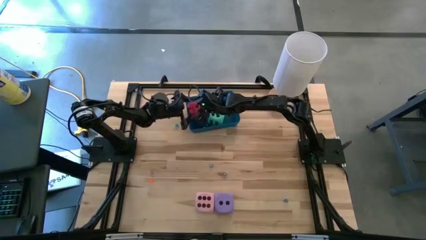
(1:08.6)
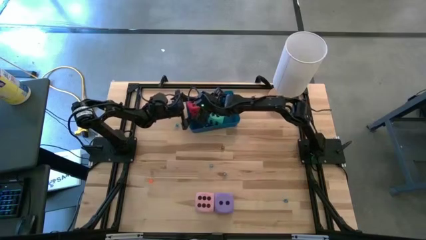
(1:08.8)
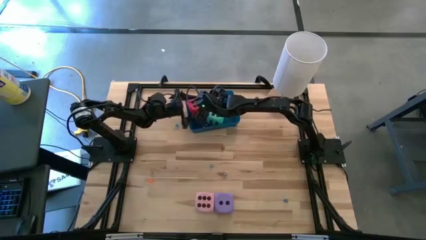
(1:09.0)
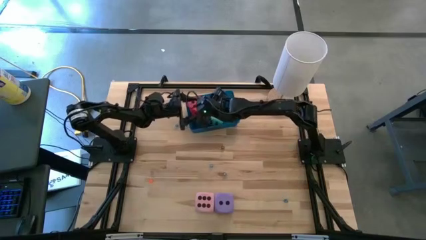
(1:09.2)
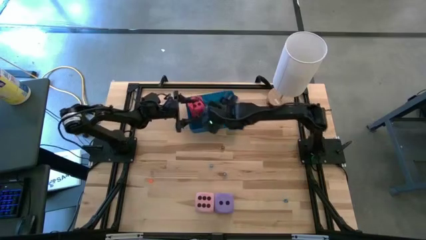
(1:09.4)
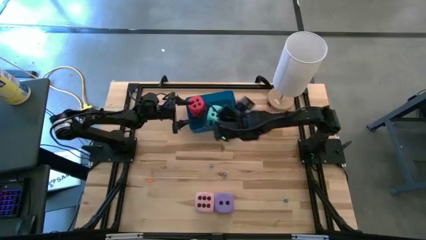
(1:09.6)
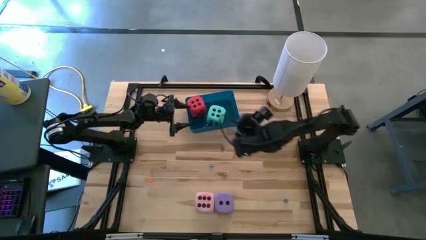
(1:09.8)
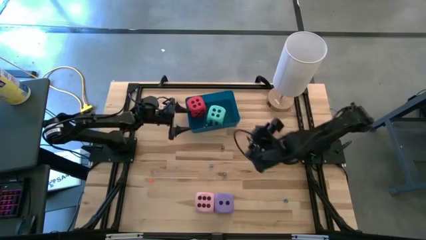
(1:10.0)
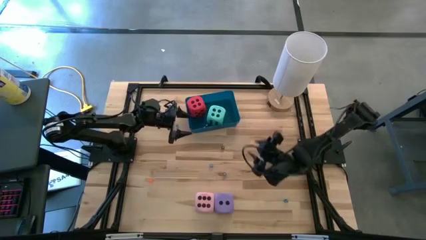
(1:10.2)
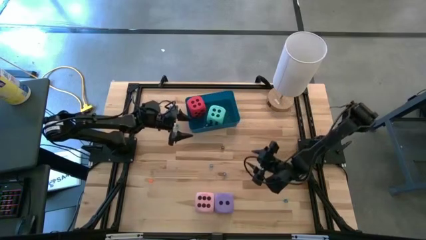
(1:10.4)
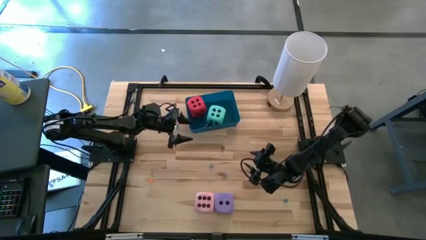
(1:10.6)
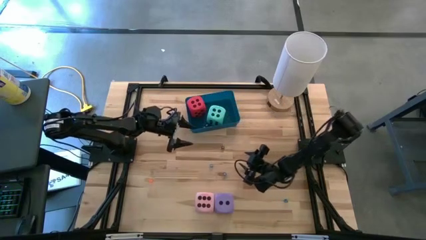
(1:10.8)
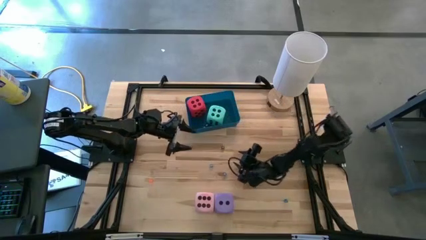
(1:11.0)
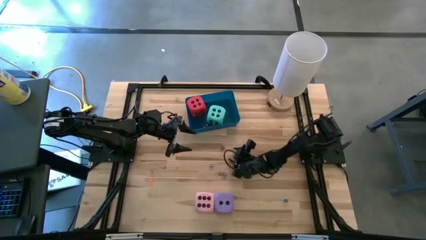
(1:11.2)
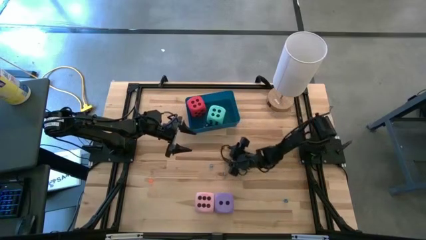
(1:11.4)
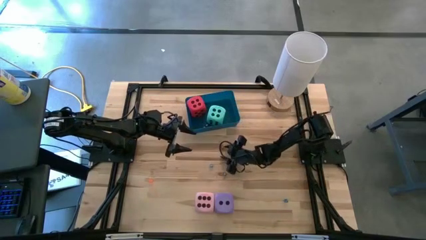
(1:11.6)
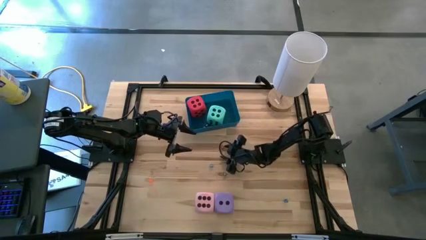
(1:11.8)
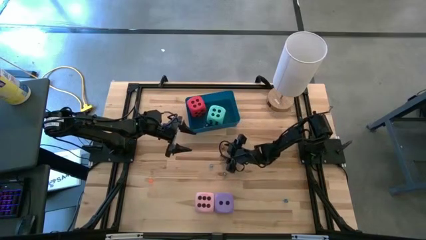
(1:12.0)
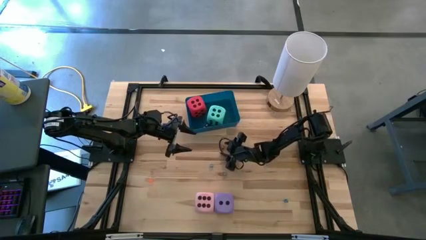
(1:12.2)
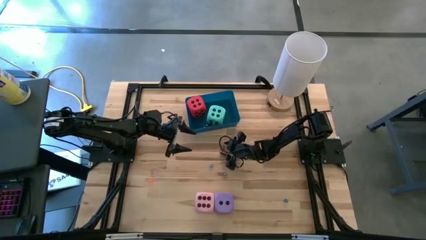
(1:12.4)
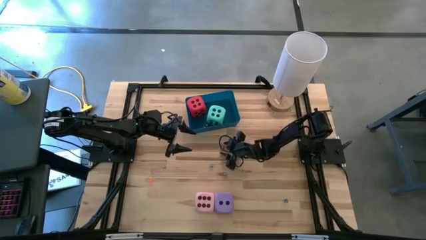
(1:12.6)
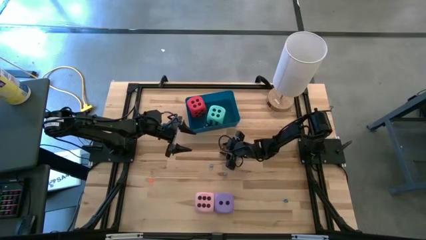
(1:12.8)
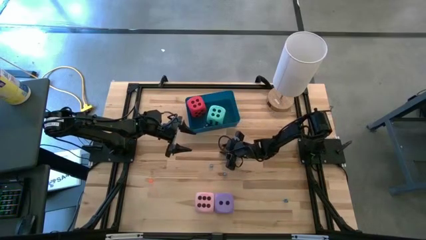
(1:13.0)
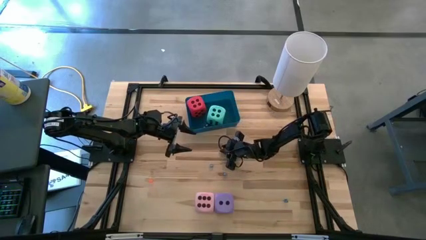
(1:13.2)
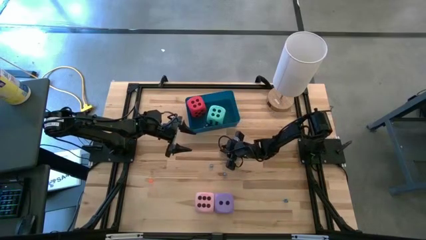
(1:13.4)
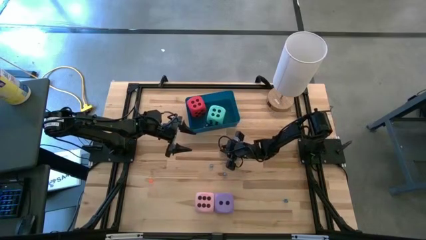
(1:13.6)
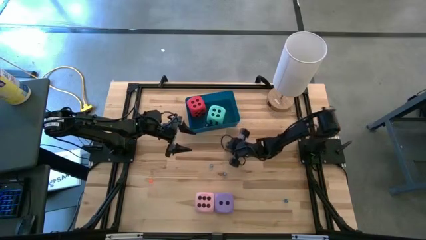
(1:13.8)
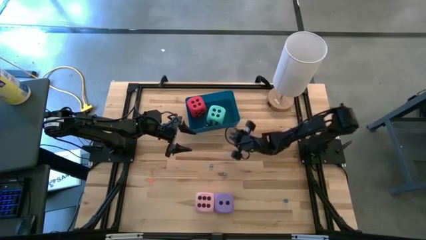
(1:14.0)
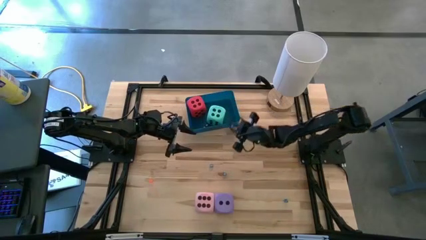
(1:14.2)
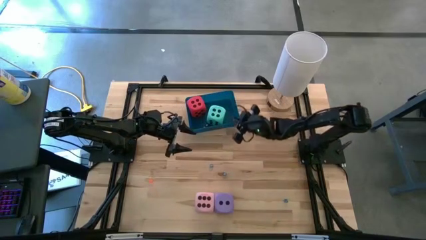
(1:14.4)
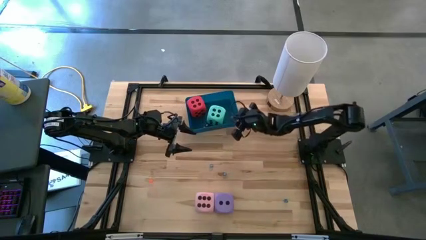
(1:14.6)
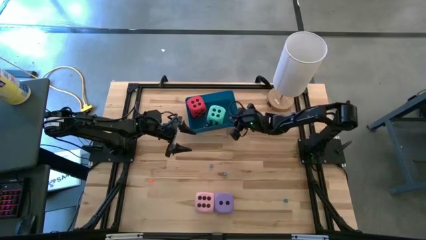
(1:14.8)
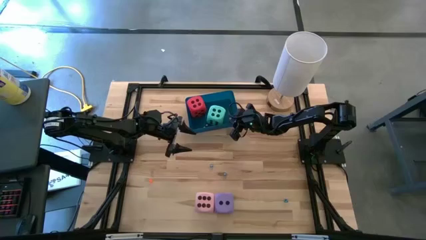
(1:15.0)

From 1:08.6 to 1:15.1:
Task: Pick & Place Dice
Put the small black dice into the blue bin

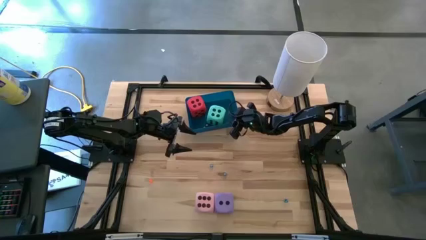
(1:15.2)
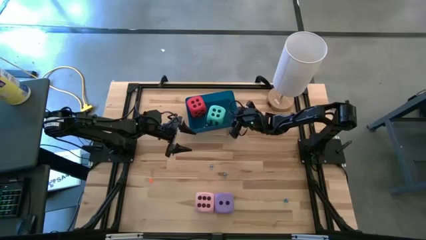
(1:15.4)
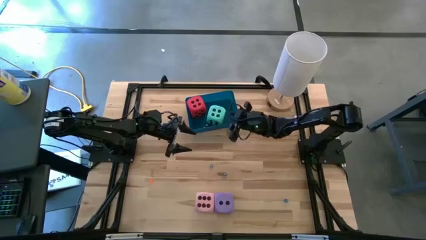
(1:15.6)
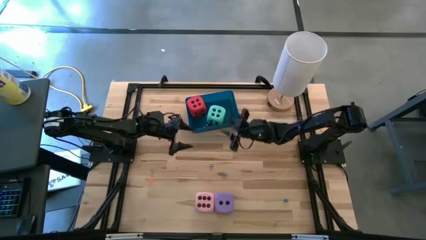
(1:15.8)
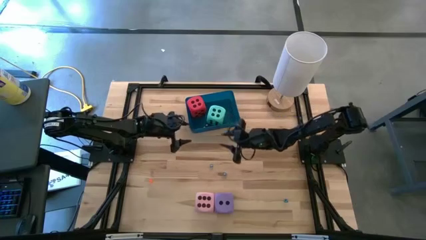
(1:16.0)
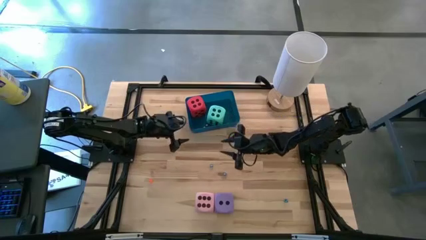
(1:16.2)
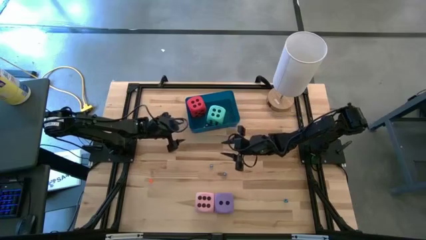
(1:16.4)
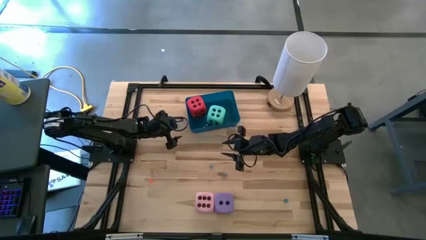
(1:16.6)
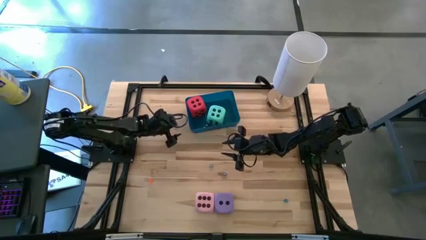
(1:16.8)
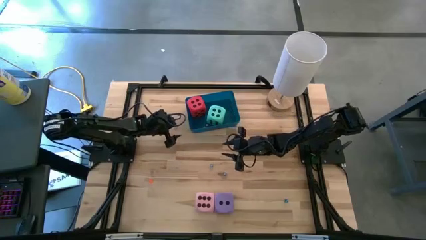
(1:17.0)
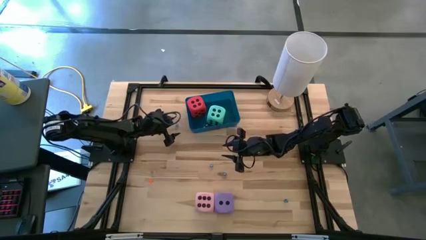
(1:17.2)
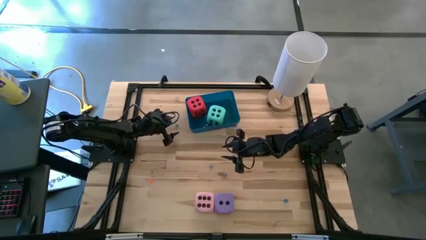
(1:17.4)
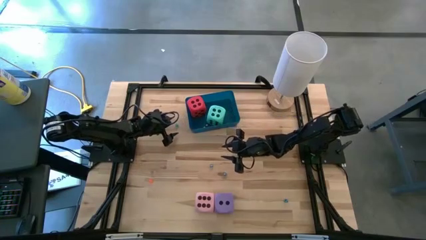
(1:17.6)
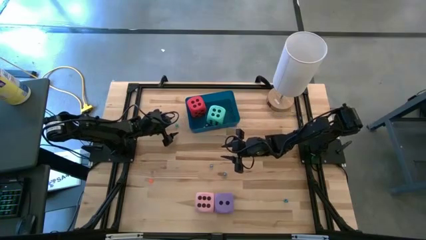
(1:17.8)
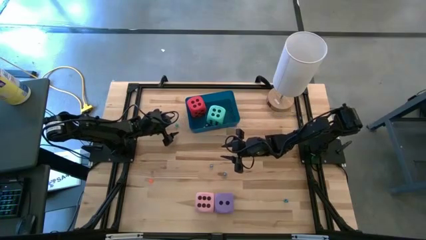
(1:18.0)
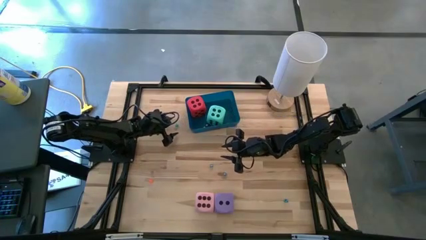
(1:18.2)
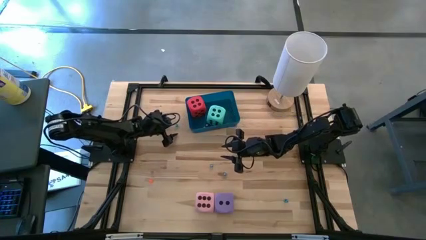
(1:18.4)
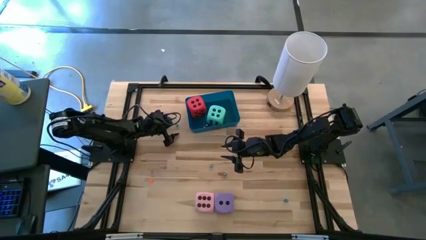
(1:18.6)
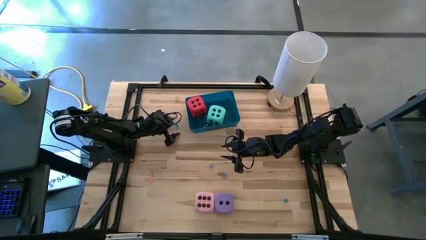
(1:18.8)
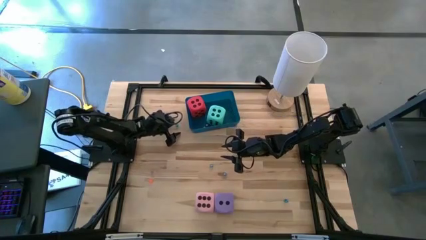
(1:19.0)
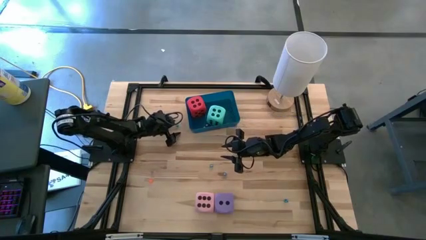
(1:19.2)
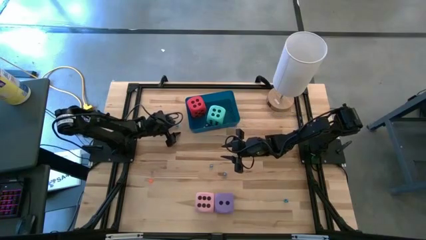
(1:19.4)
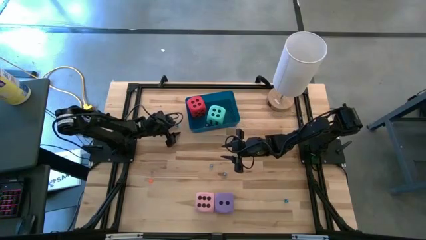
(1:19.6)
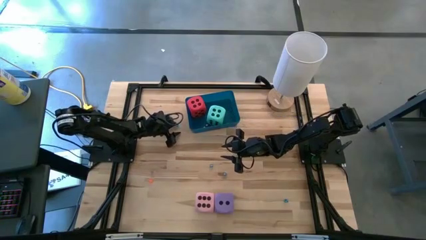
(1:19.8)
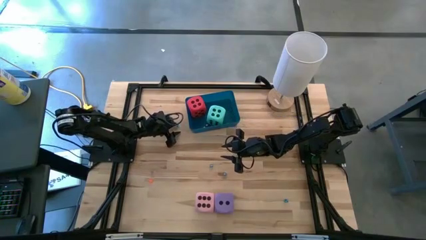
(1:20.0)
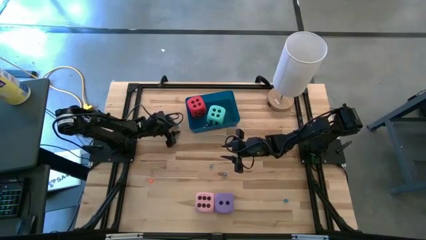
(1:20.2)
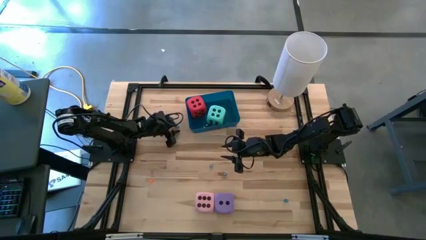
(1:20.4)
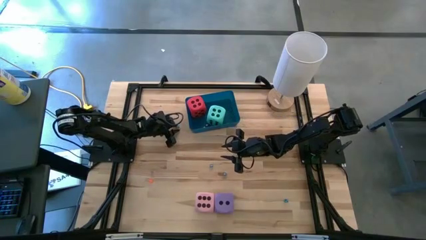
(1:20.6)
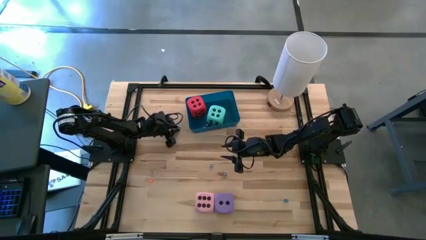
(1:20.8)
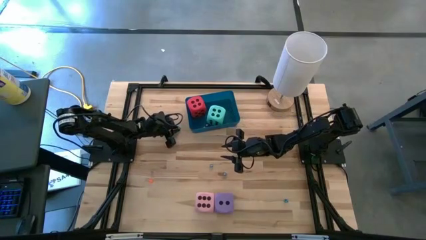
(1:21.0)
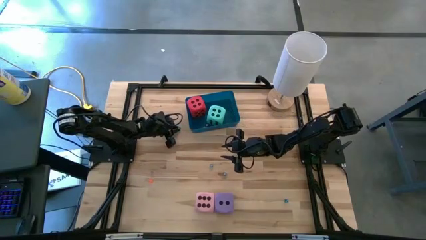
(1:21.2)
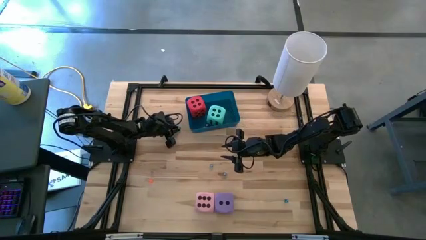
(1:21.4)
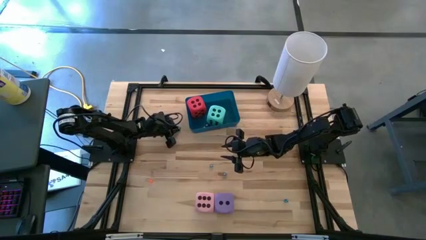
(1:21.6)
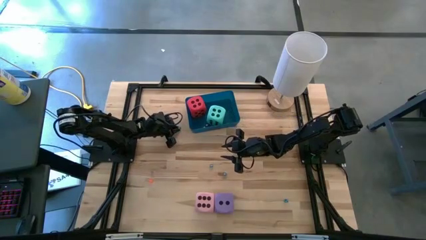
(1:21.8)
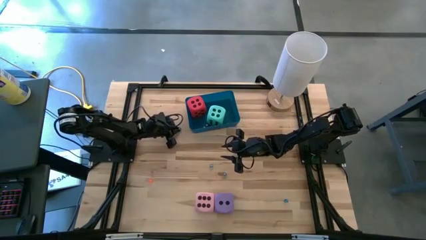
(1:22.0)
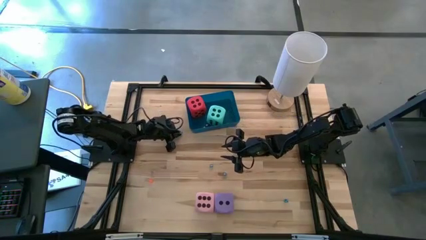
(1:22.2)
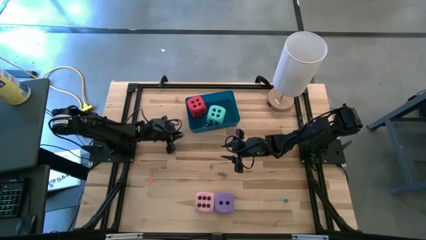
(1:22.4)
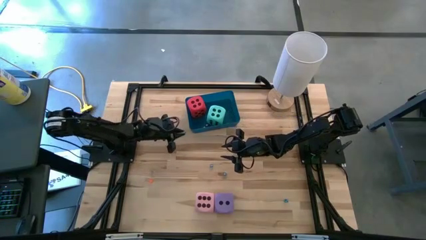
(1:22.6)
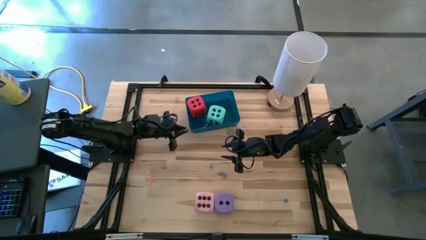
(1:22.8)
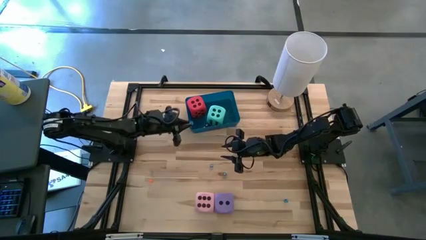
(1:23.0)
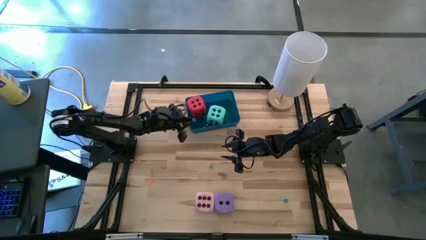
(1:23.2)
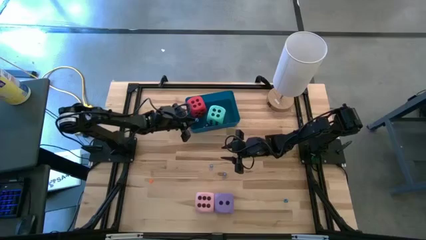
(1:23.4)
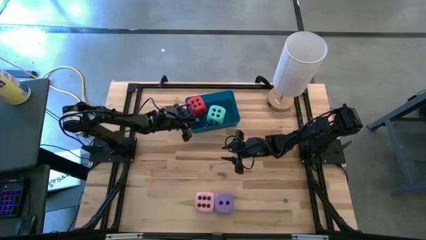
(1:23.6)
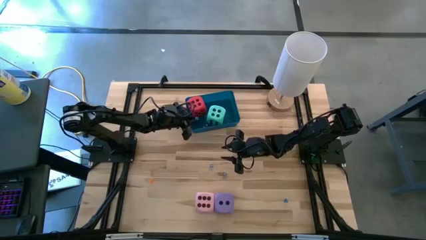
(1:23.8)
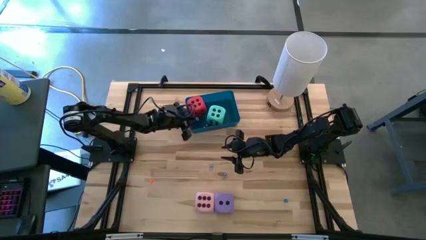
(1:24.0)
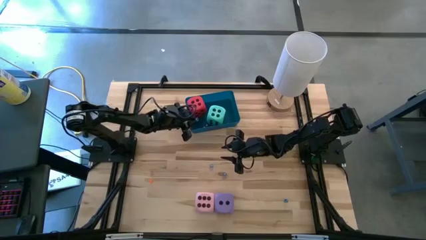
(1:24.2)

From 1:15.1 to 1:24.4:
Put the small blue dice into the blue bin

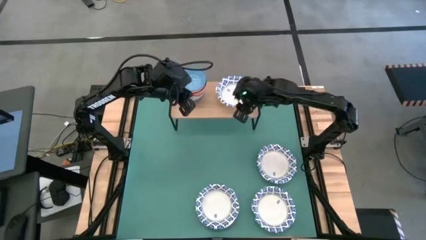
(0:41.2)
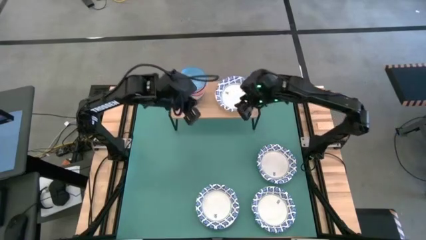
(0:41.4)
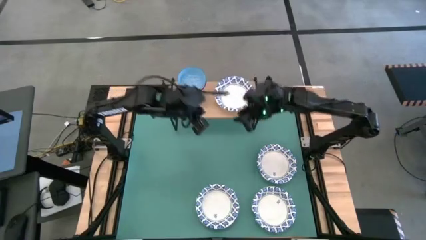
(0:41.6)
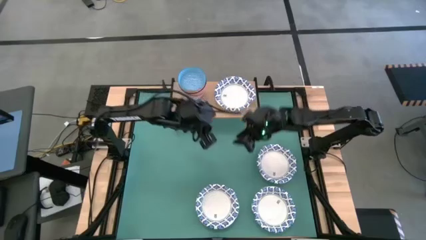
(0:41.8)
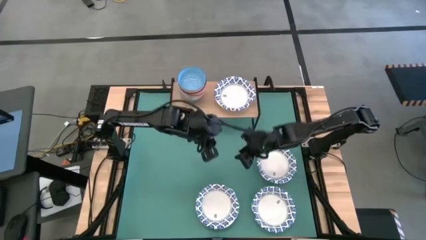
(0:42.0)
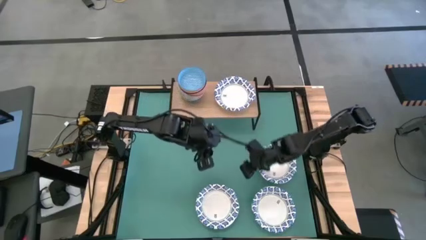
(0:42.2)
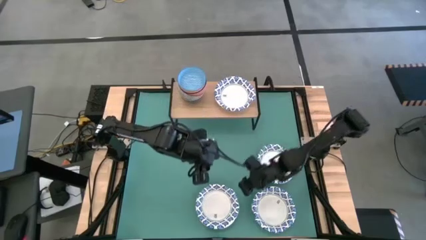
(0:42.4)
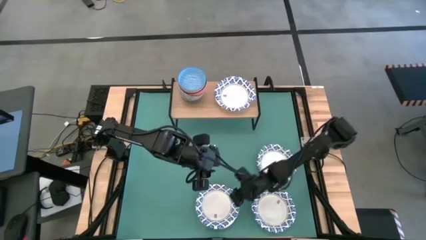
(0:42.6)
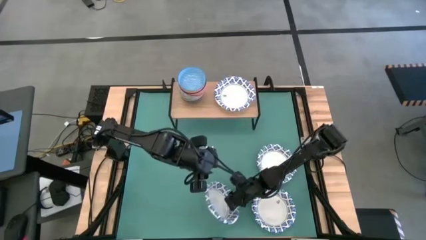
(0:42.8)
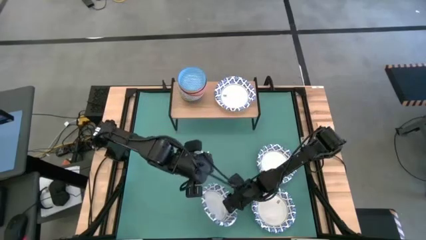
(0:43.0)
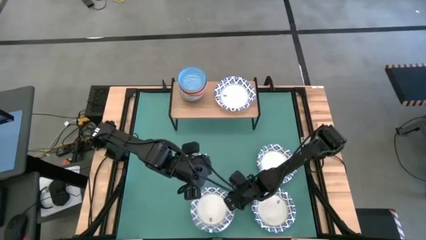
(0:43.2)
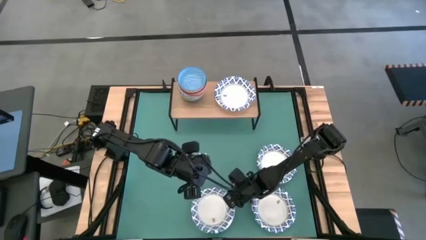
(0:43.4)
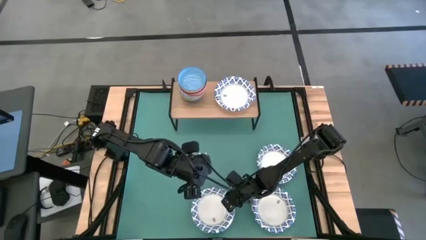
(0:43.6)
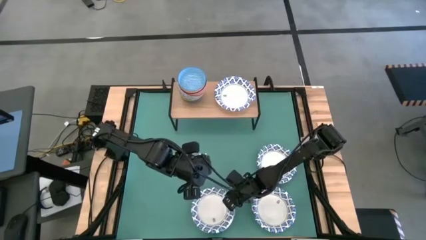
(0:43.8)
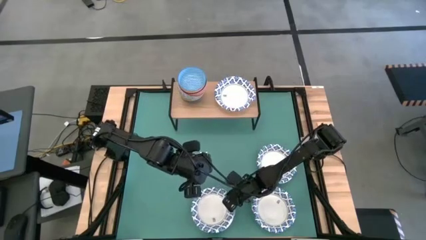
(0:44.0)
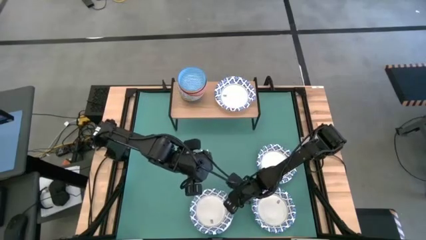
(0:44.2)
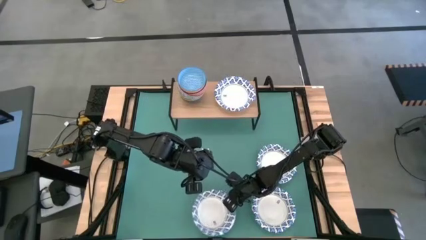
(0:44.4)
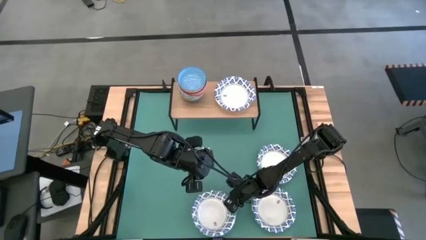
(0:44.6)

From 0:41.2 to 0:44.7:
Task: Place and stack bowls onto a shelf
Stack the white bowl on top of the white bowl on the shelf
